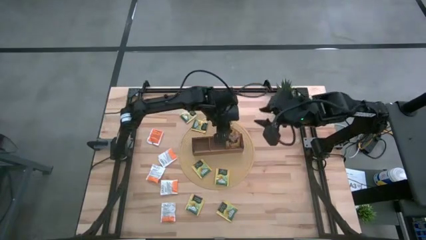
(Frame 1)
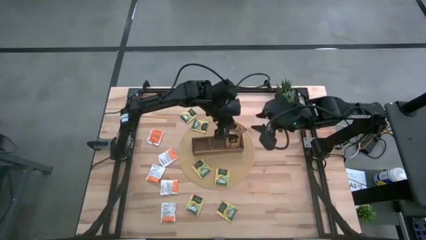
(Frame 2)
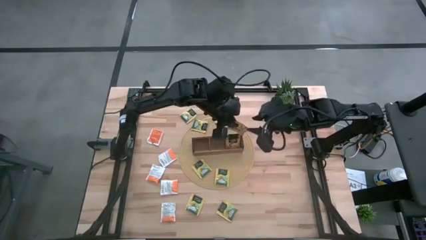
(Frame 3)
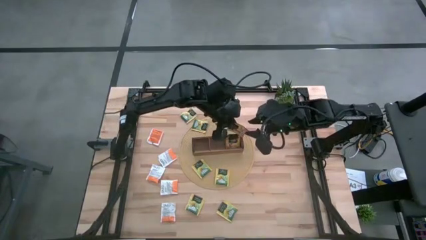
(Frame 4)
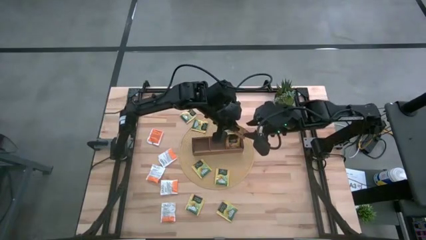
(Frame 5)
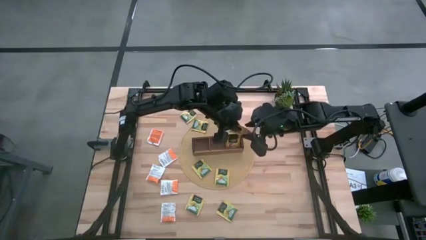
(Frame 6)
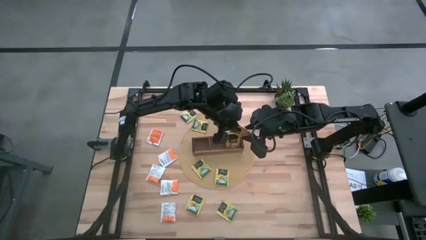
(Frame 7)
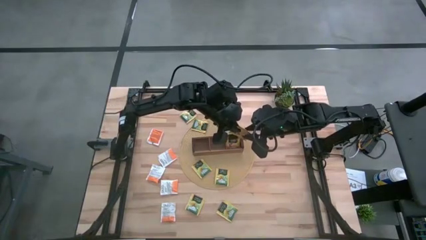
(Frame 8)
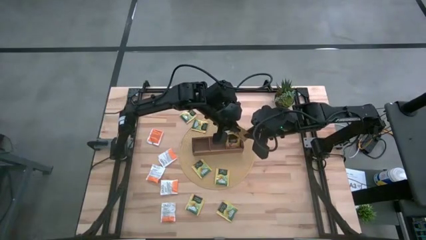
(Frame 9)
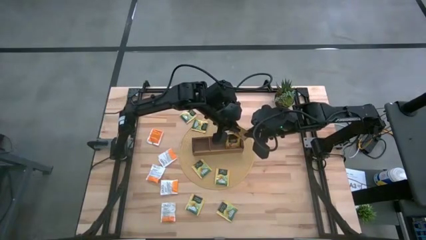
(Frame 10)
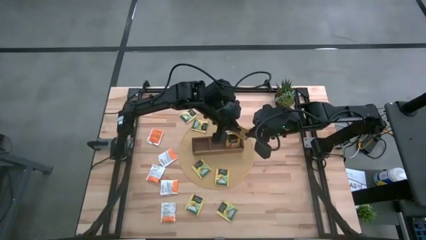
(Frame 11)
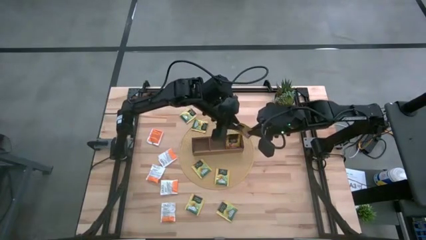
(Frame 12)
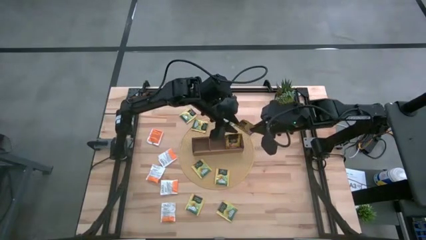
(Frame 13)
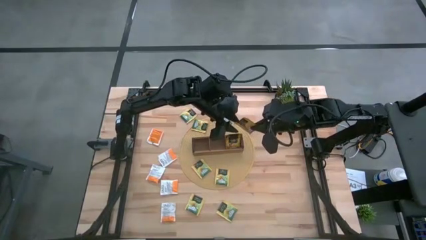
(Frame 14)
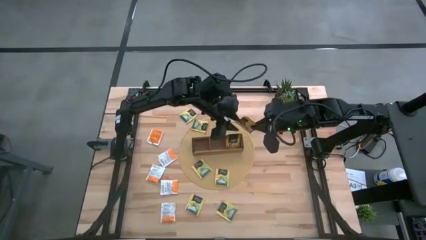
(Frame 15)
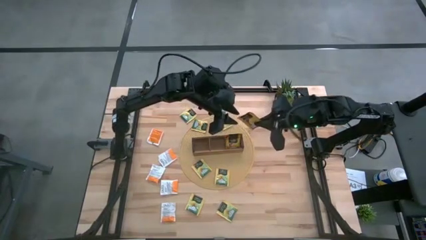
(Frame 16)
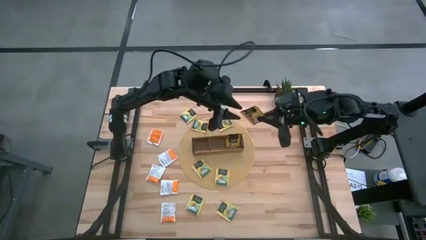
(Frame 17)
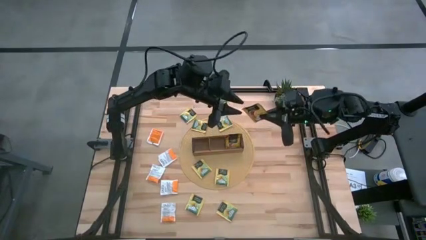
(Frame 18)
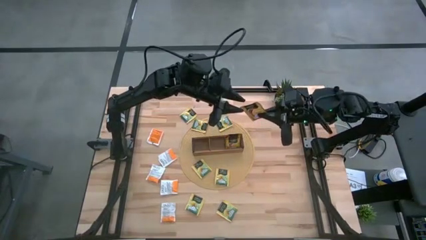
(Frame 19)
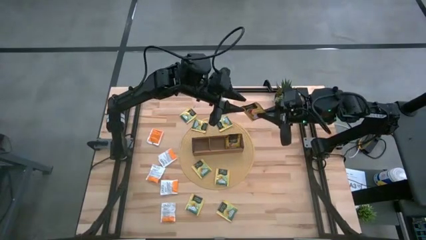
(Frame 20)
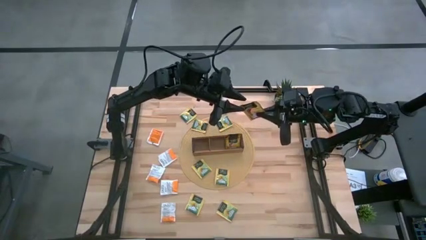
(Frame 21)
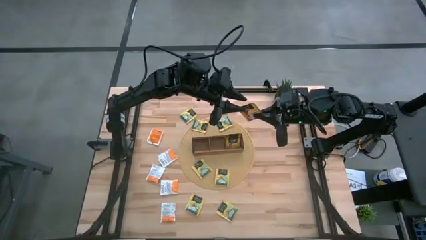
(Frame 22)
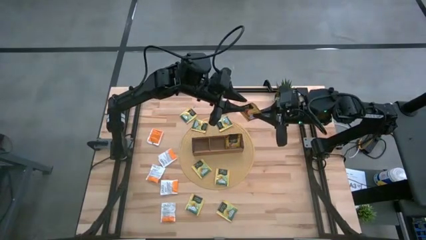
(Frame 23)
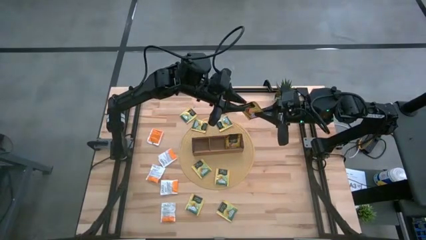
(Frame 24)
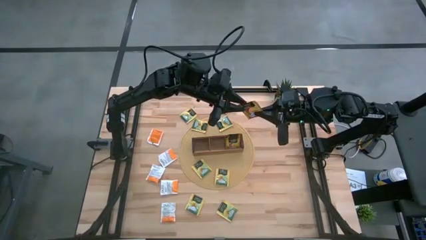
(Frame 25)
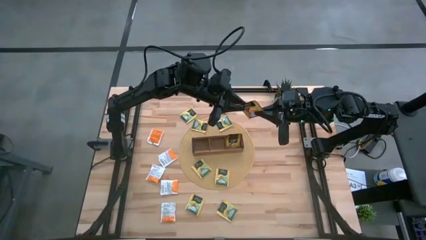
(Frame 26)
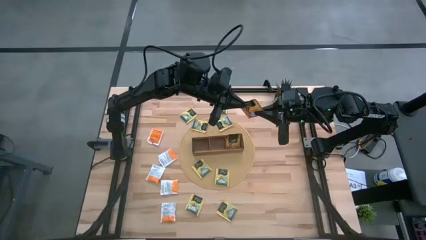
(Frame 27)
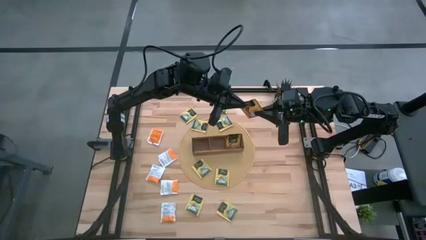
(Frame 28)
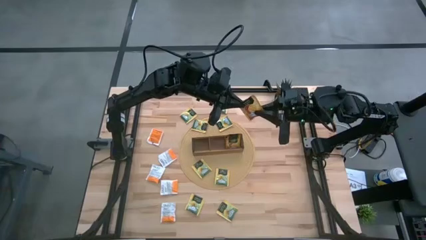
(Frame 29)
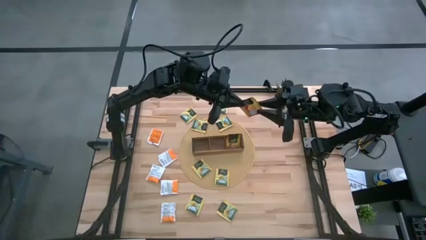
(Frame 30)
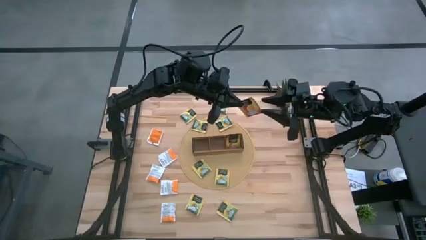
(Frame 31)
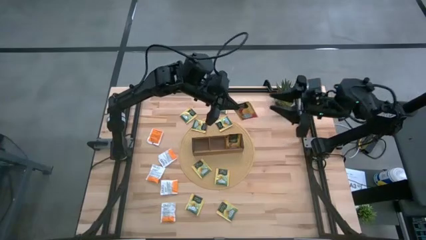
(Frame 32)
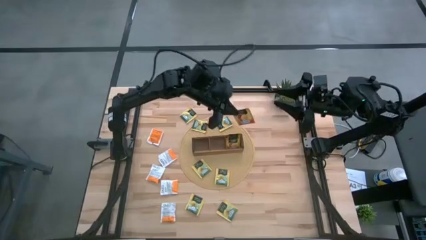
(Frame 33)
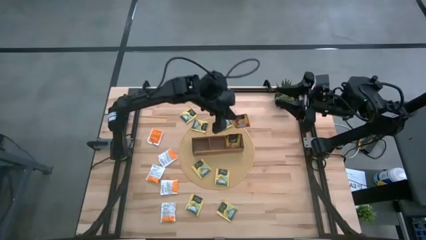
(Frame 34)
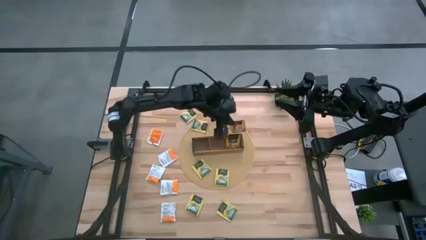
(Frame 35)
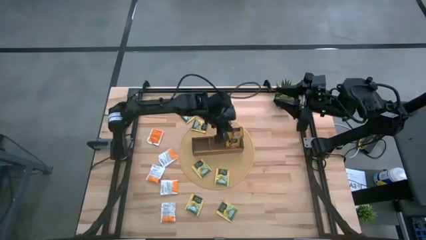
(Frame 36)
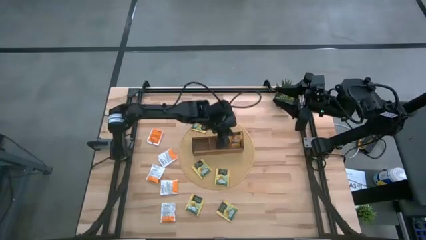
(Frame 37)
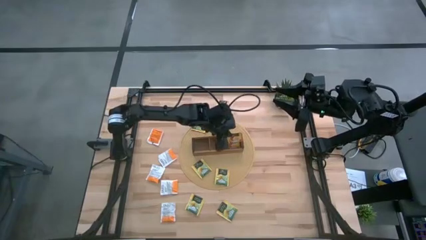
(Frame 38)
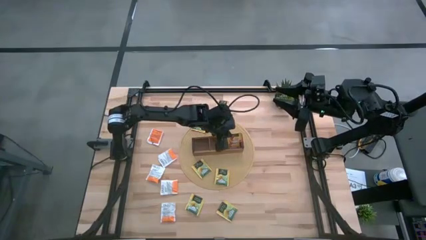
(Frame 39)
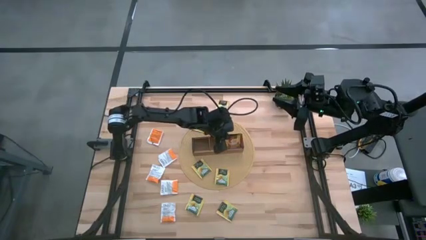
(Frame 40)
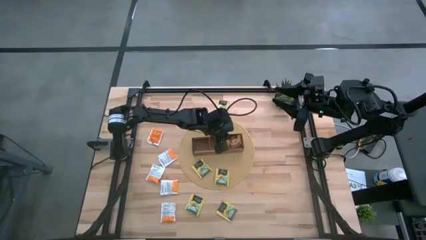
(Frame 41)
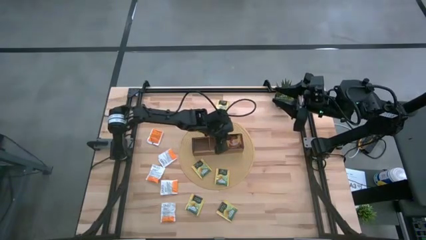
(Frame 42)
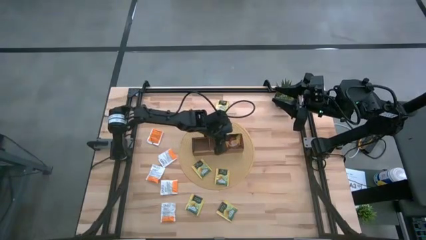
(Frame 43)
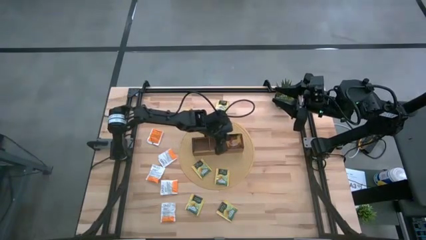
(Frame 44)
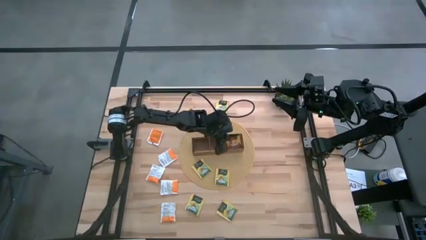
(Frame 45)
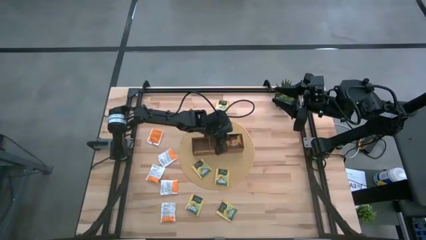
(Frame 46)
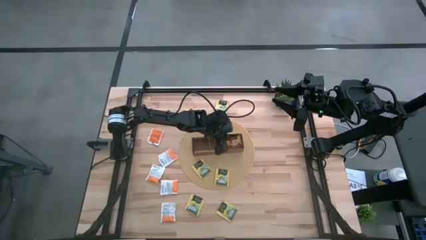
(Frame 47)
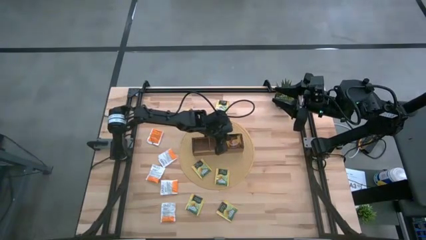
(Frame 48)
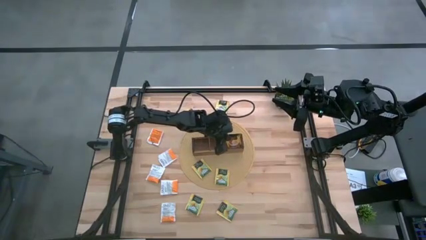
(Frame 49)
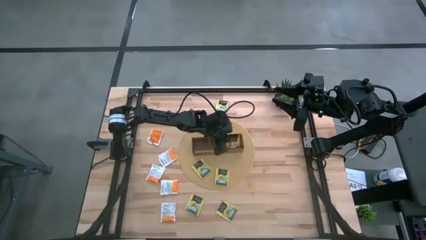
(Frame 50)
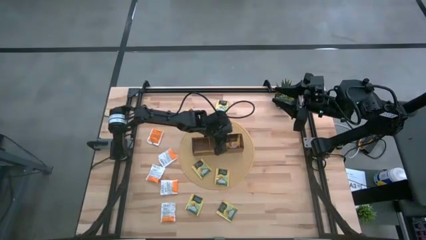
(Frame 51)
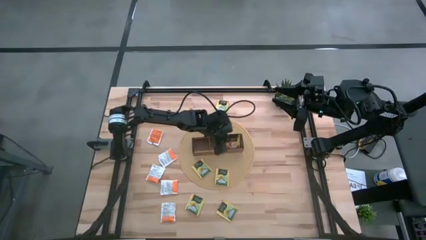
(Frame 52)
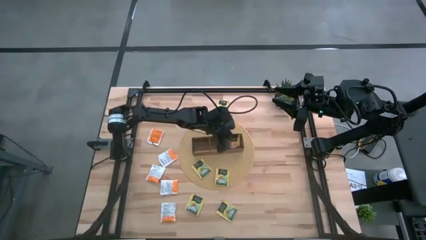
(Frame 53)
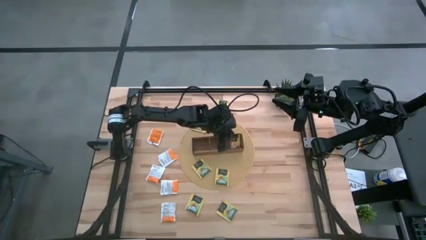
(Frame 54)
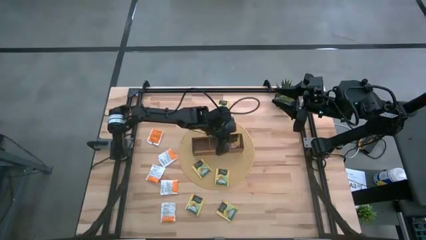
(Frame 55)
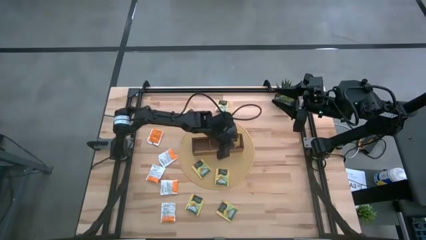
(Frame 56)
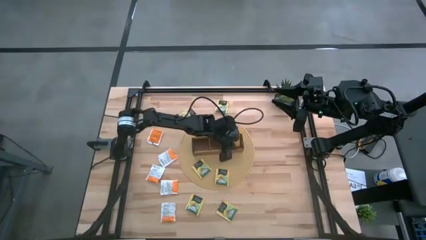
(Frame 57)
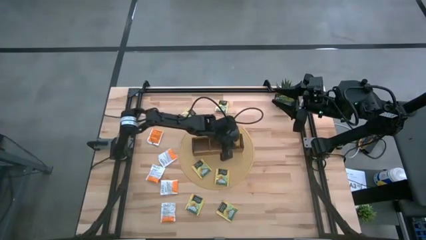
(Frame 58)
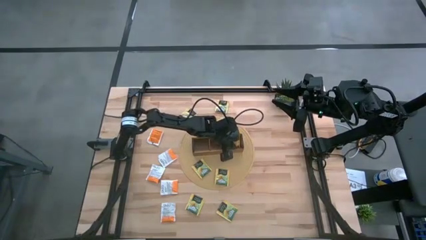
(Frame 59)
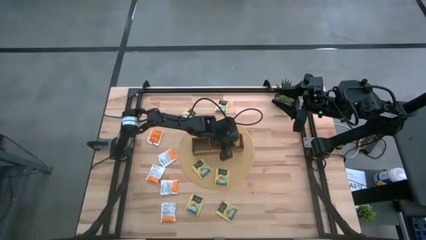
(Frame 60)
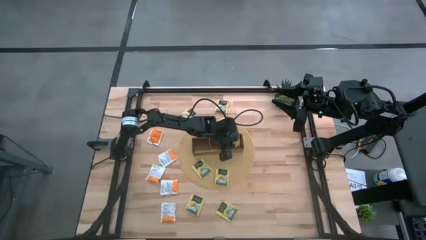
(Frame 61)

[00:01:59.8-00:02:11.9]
Task: Pick & Place Tea
Put the orange tea bag into the right section of the wooden organizer

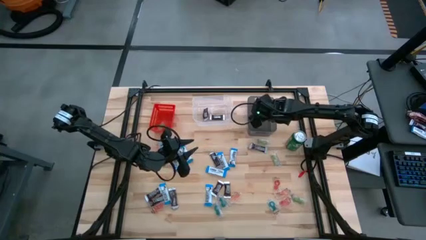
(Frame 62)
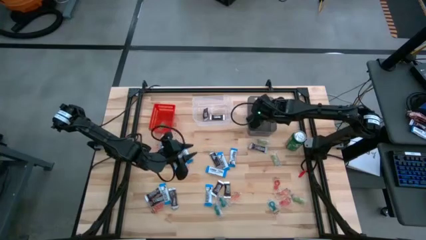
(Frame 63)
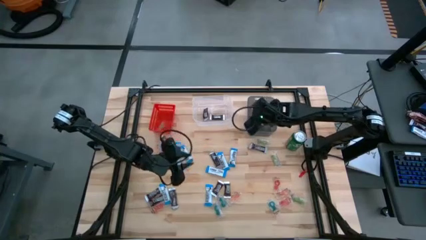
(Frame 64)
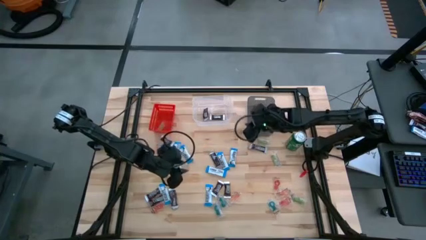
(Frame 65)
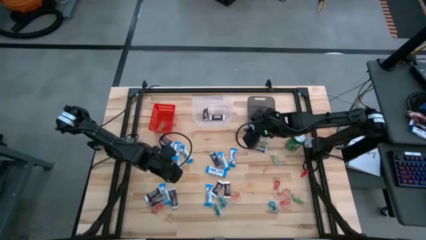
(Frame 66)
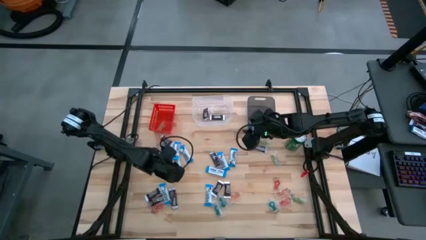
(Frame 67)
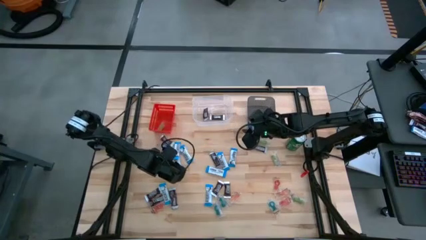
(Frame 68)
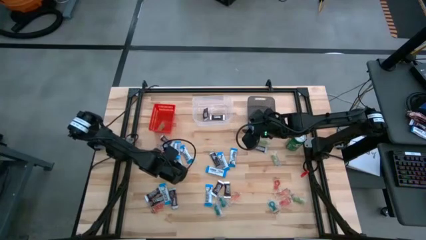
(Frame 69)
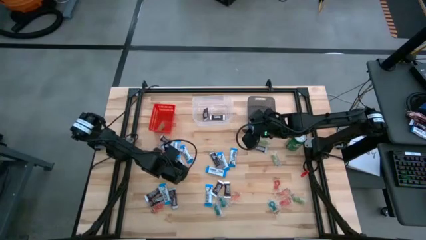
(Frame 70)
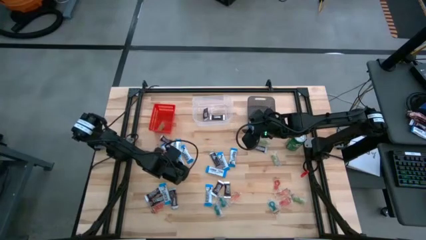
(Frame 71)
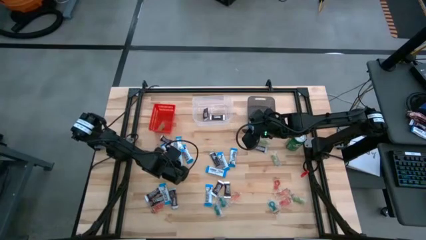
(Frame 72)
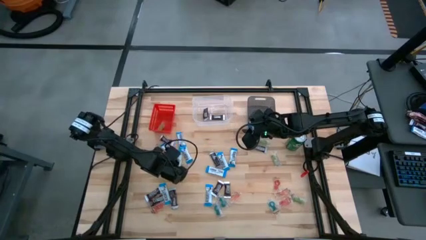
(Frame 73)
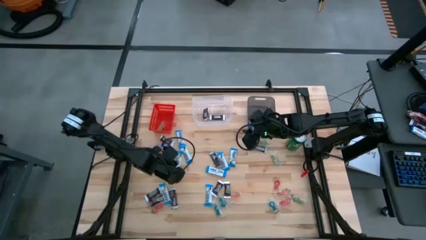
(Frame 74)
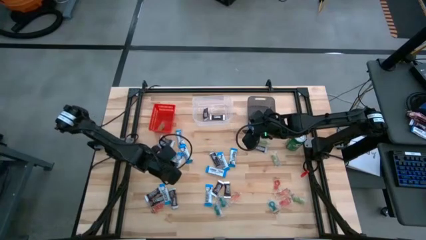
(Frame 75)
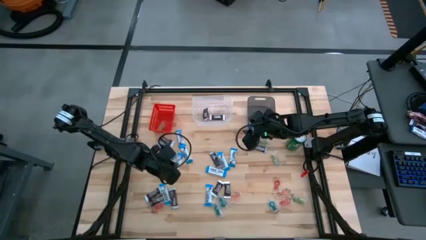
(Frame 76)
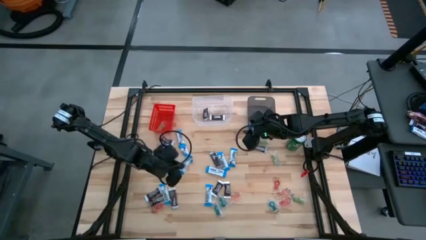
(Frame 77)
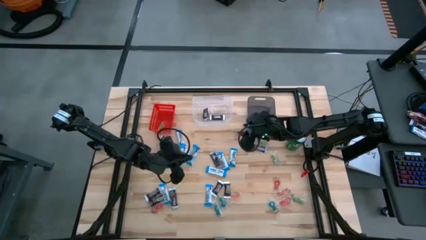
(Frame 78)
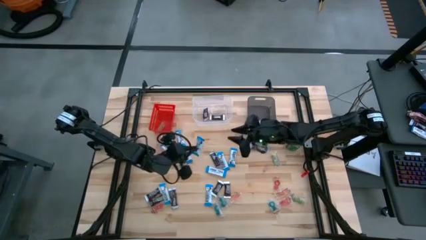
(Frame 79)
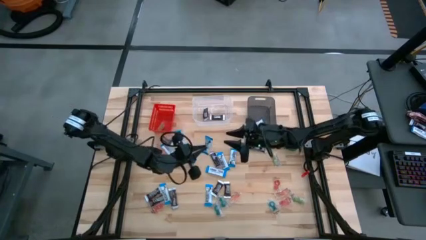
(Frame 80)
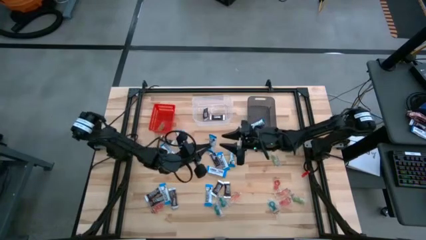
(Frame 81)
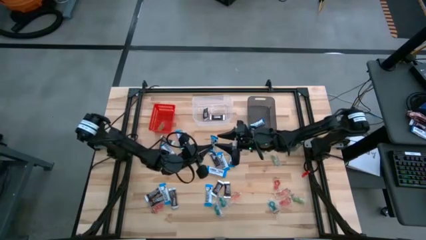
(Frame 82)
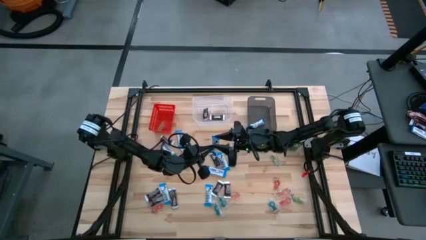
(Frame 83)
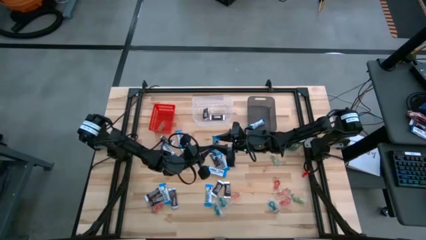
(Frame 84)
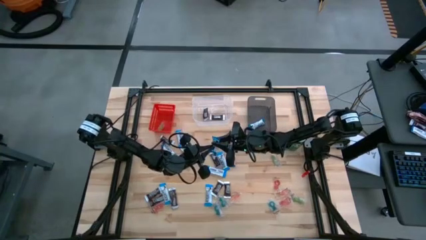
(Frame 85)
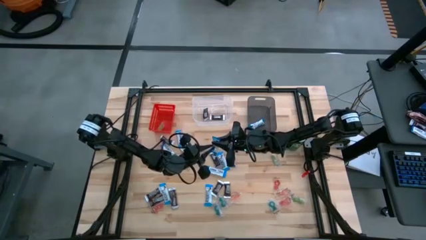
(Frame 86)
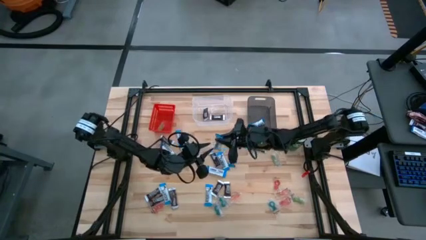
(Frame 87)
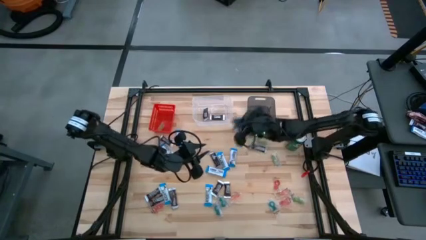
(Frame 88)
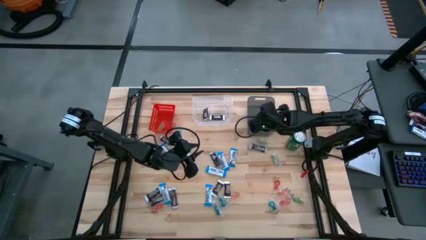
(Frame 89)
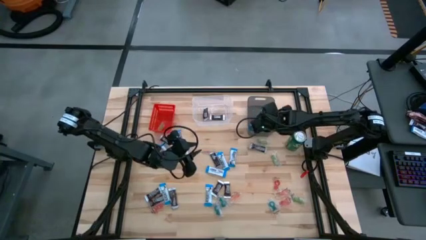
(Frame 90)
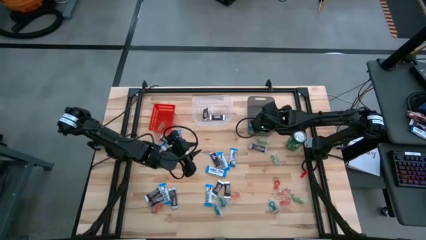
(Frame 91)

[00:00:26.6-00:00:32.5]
Task: Sort candy
Put the white chocolate bar into the black bin
